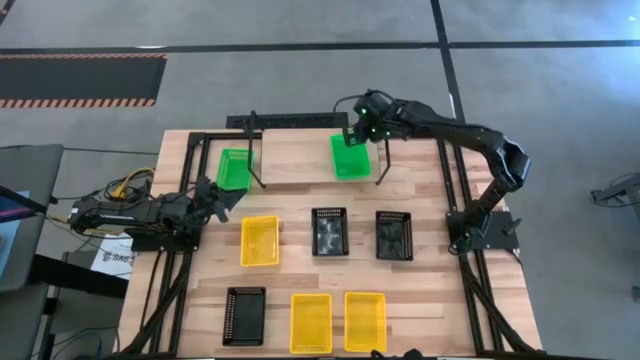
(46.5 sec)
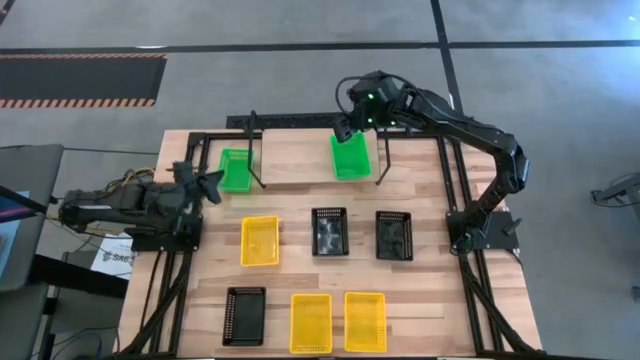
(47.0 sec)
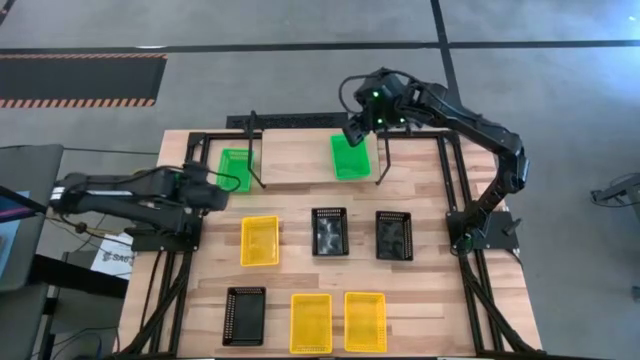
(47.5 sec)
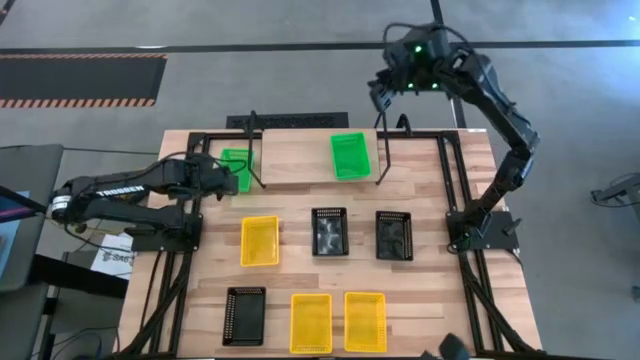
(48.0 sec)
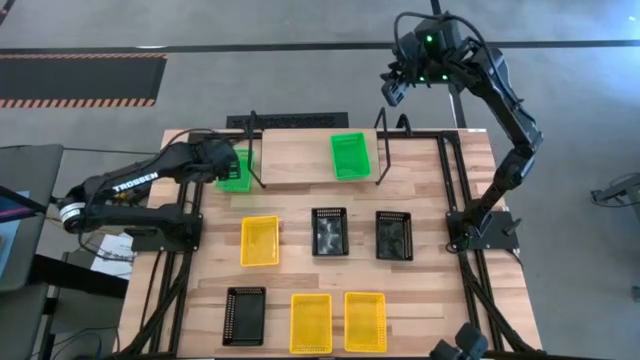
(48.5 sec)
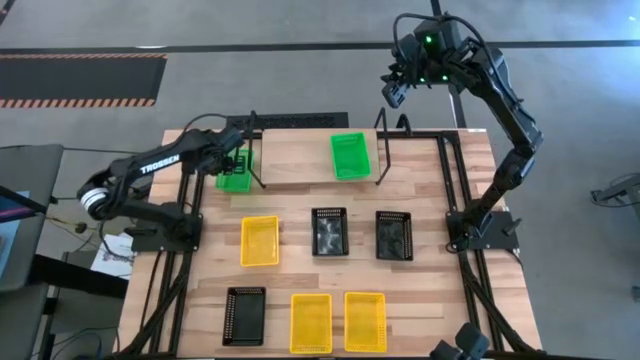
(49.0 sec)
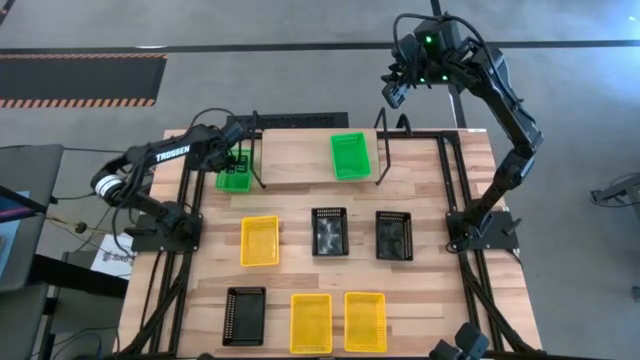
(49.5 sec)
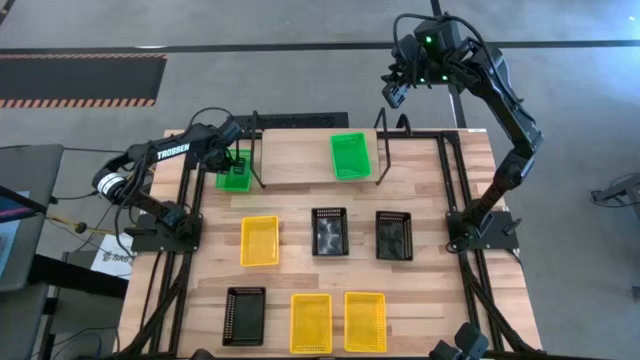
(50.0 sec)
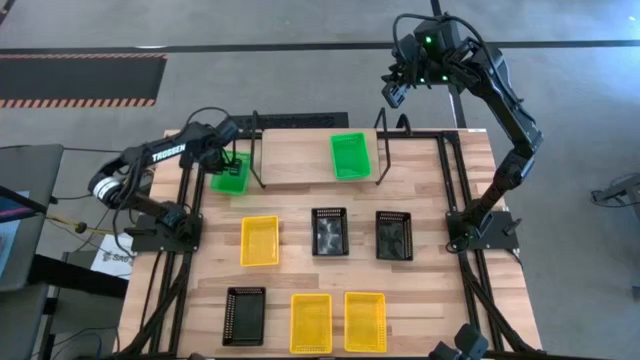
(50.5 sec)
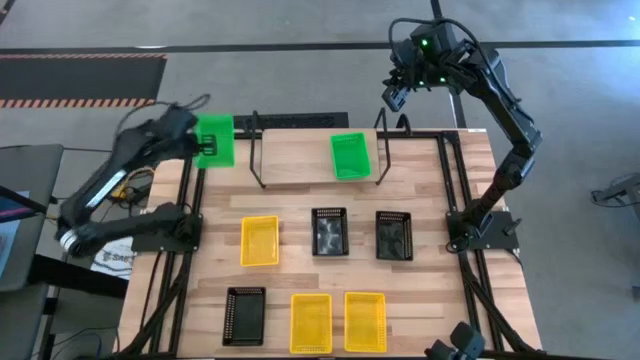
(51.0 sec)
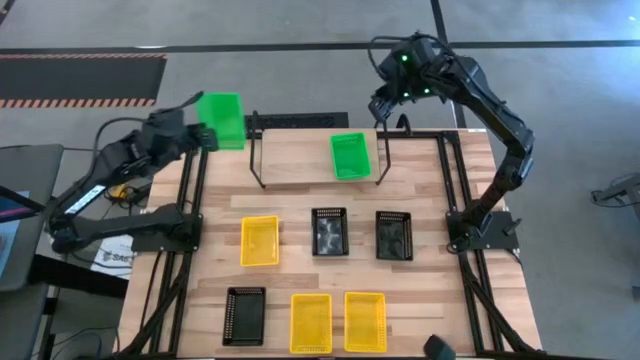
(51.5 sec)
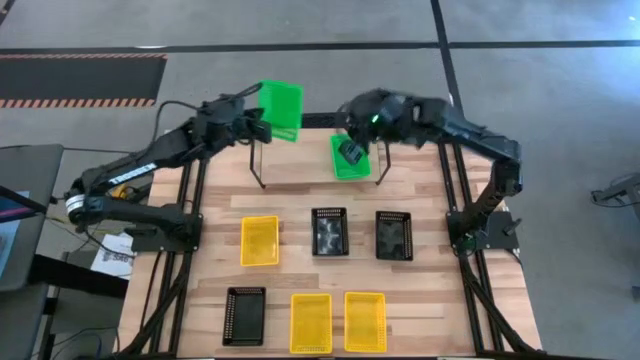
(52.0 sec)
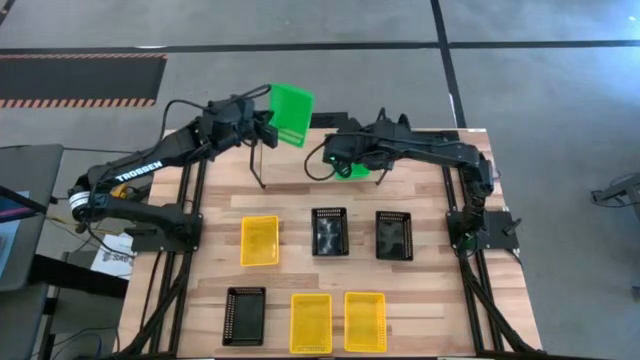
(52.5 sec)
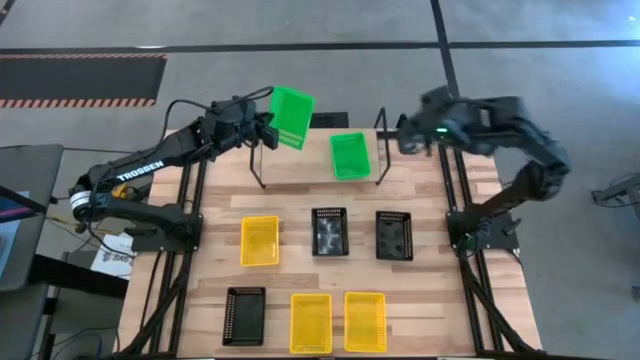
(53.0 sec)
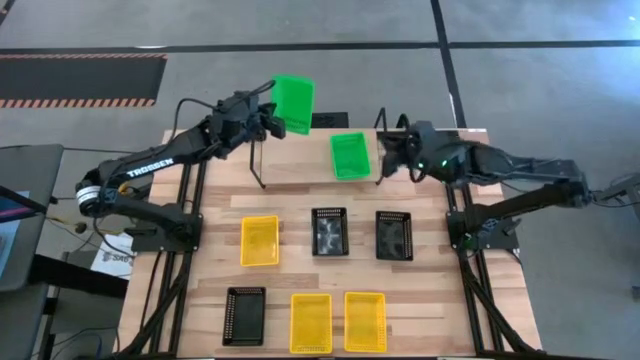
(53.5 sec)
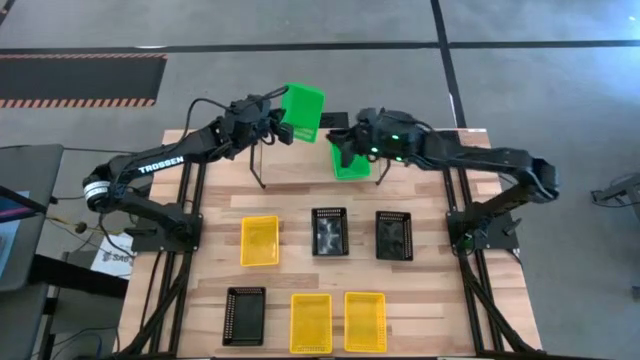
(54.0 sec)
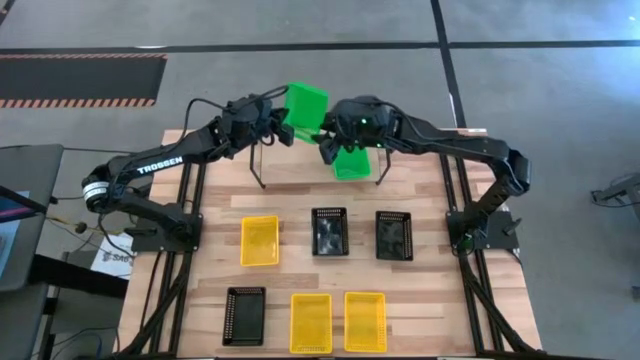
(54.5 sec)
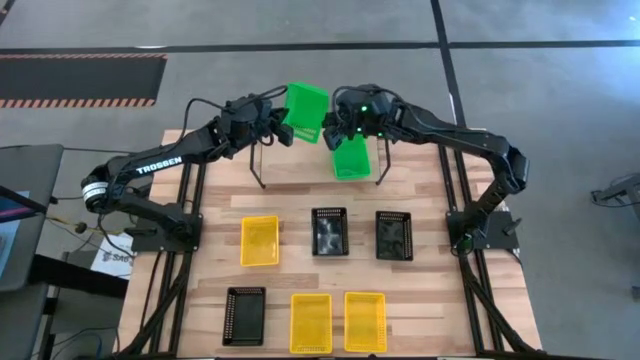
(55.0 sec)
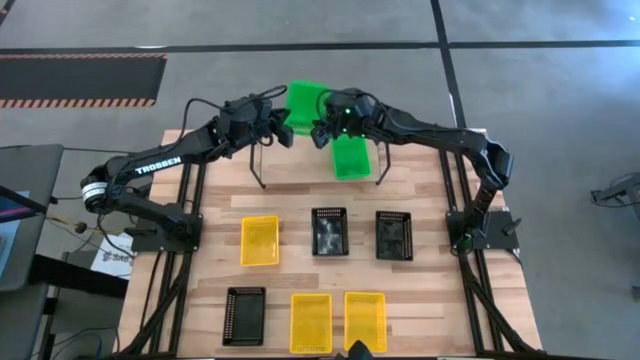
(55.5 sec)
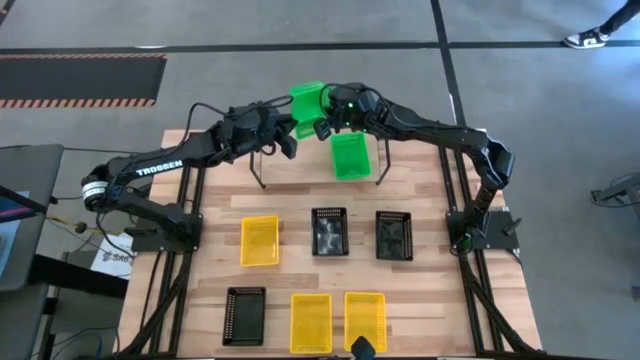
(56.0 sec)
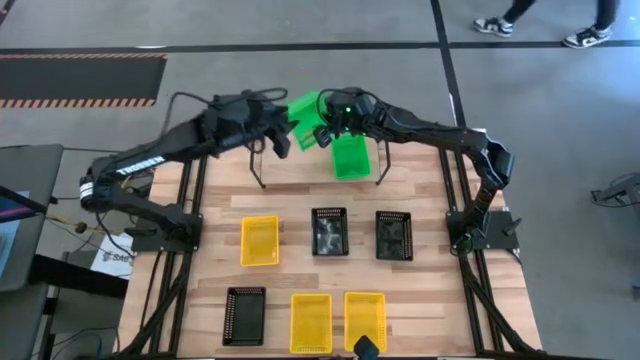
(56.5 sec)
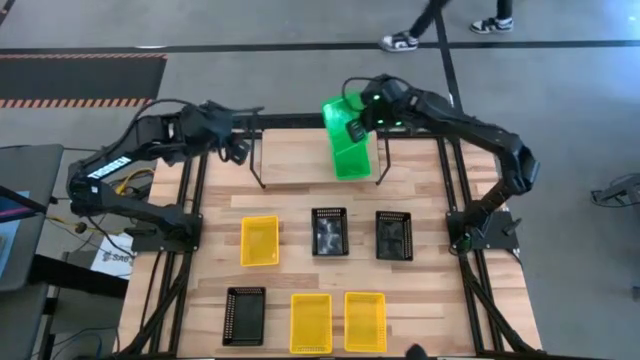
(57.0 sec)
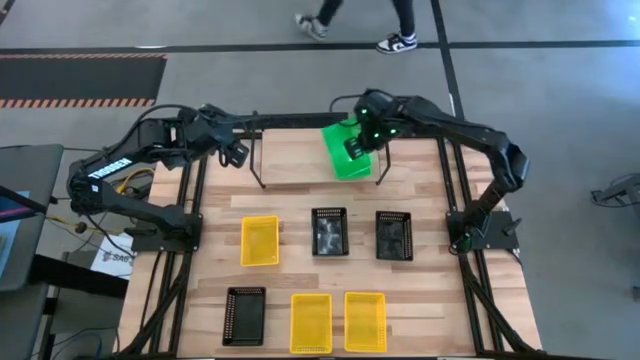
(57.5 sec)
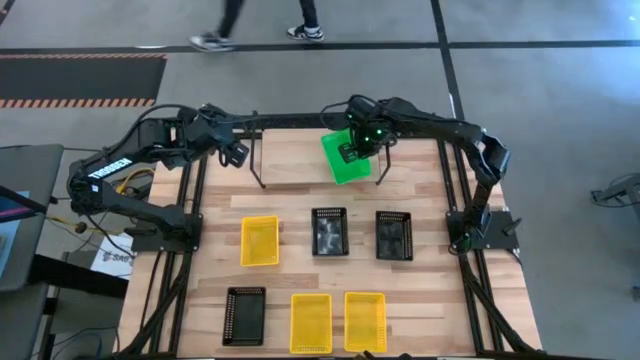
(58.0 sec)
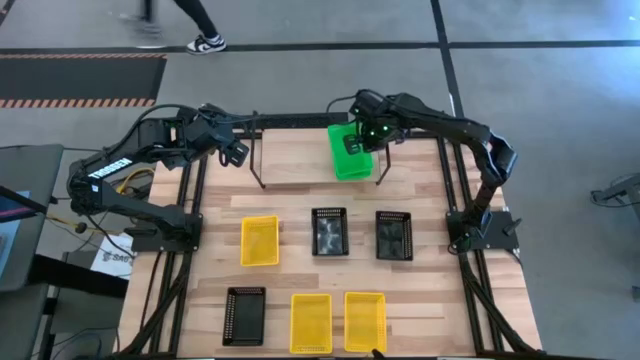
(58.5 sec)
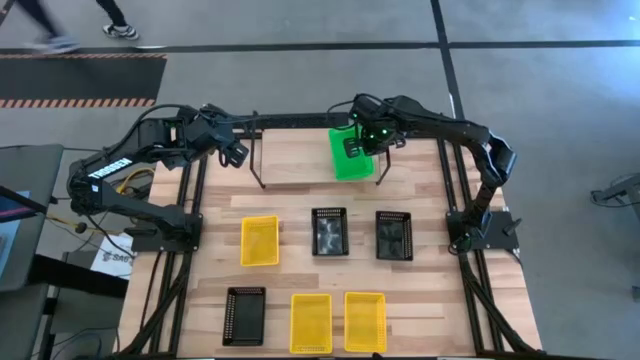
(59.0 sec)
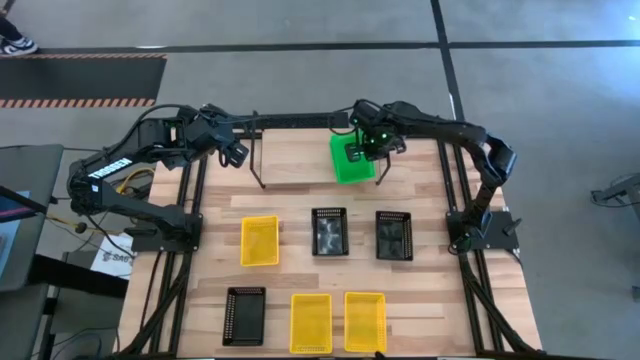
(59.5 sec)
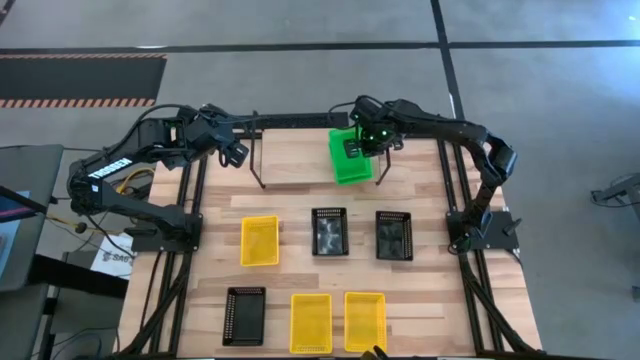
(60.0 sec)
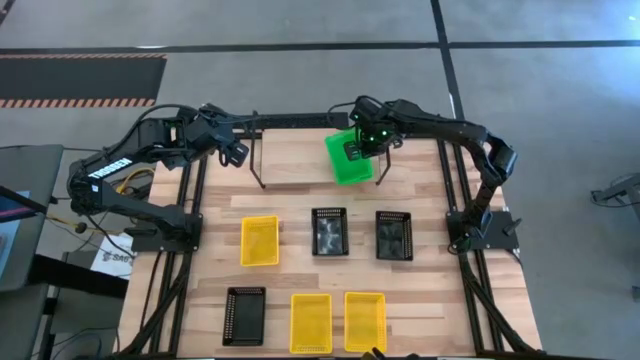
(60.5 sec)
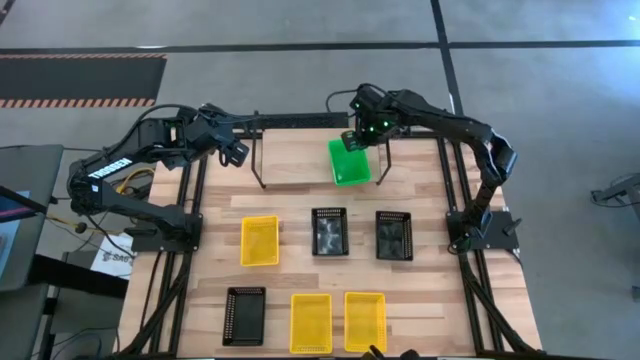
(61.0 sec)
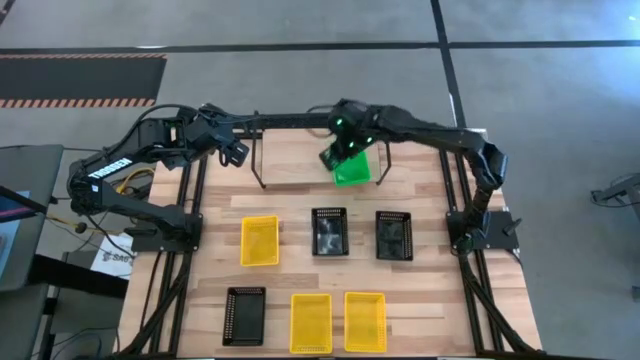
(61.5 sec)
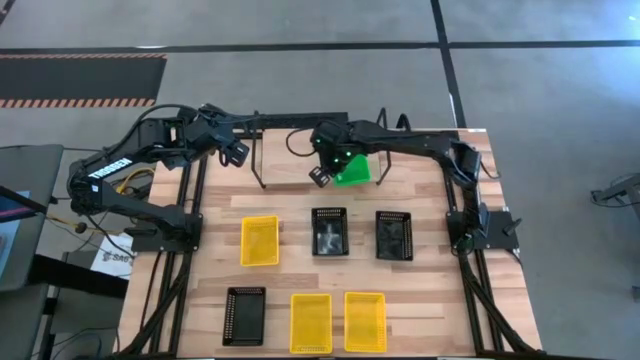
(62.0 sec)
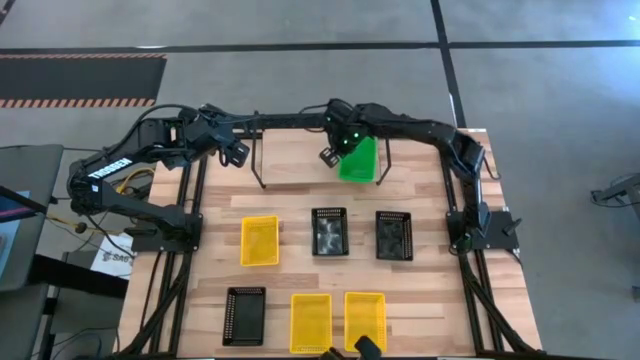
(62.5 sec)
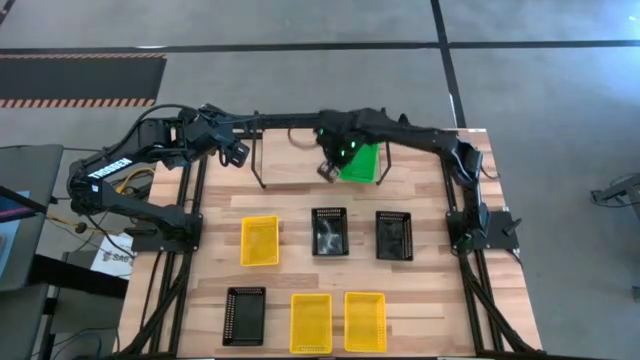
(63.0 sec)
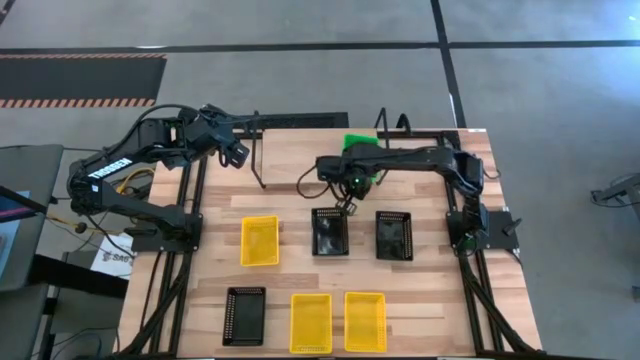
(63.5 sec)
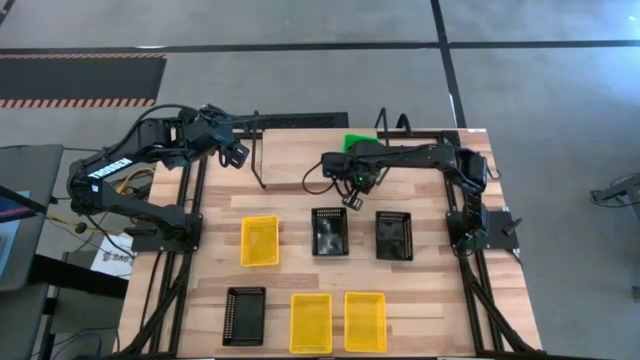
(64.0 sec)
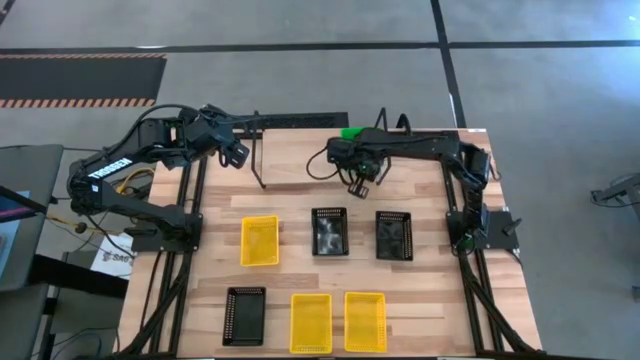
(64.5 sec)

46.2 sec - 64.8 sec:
Task: Stack baskets on shelf by color
Stack the green bin on the green bin on the shelf

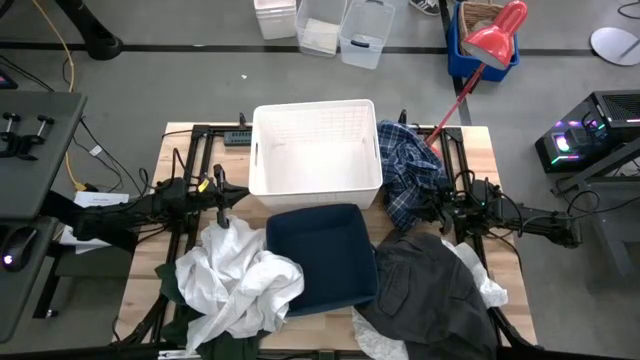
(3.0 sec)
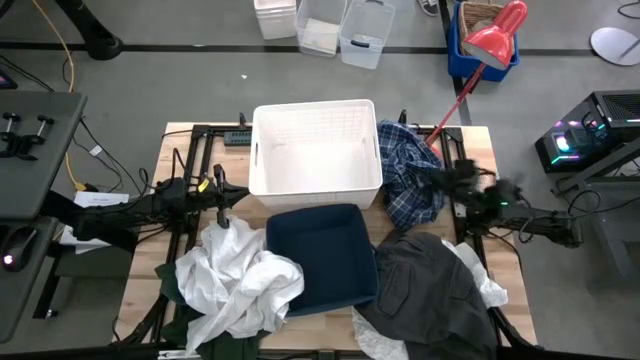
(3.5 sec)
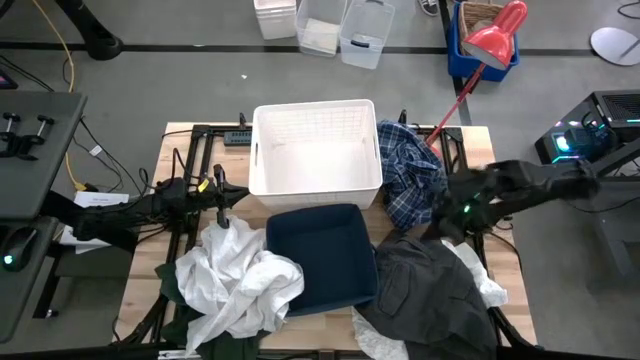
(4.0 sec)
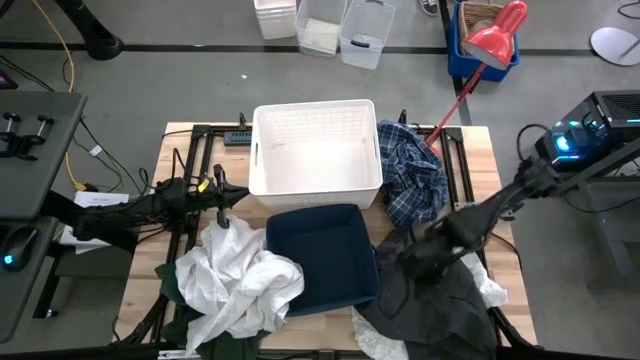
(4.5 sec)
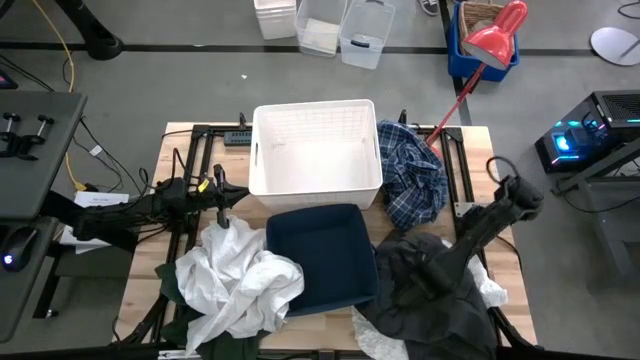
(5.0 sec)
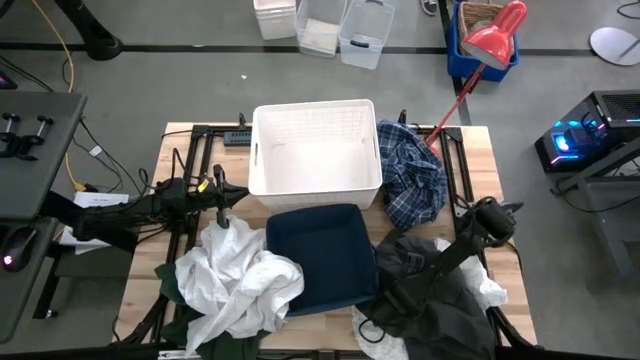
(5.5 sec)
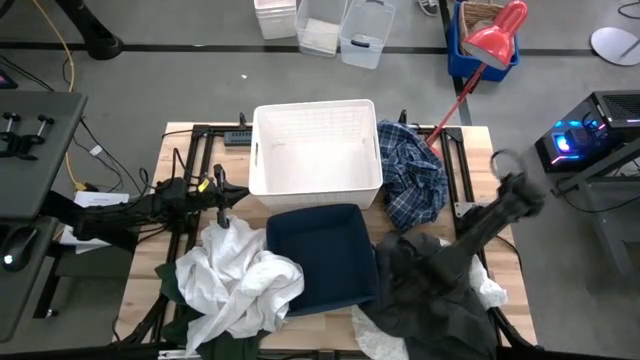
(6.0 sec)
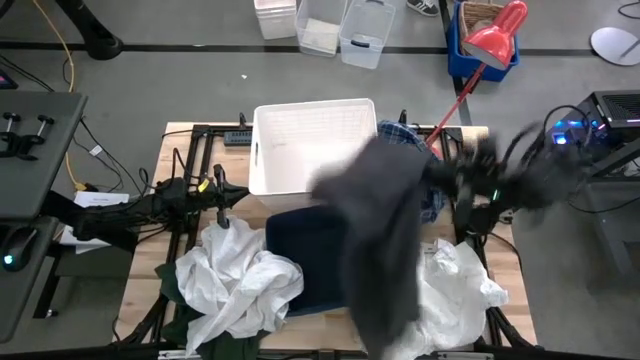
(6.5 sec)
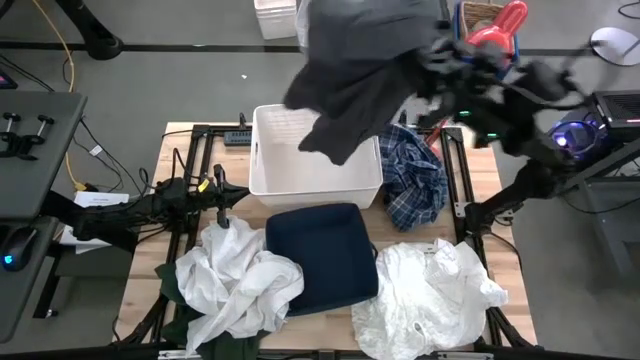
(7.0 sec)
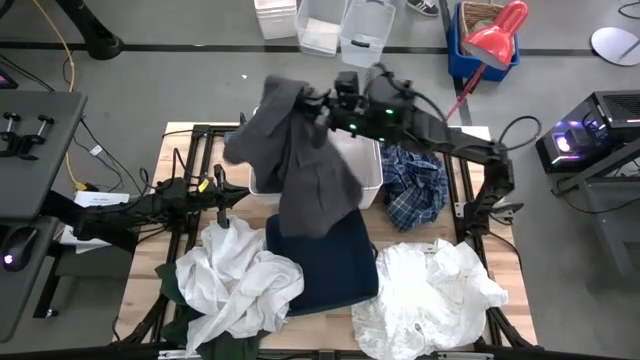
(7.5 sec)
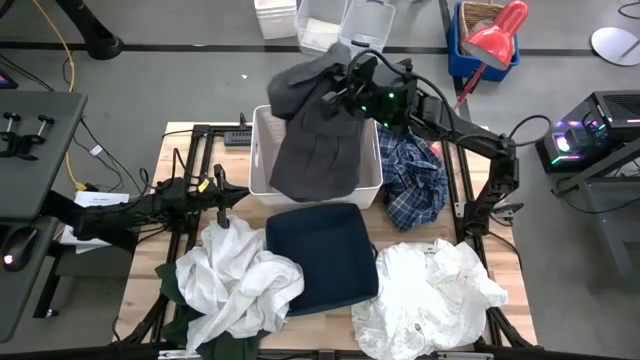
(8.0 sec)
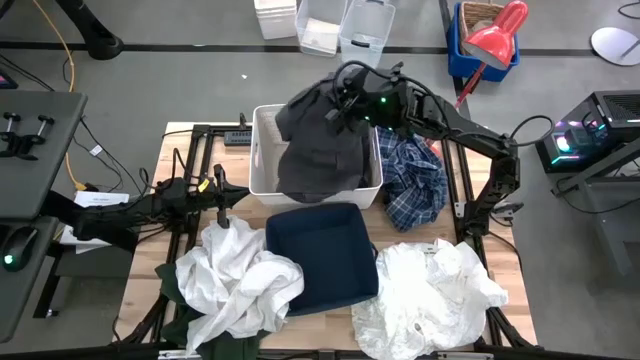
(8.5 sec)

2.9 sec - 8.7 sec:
Task: Sort clothes
Put the gray short into the white laundry bin
